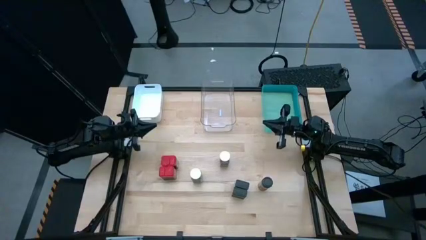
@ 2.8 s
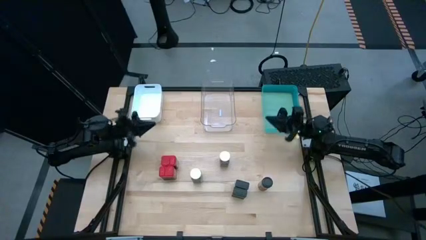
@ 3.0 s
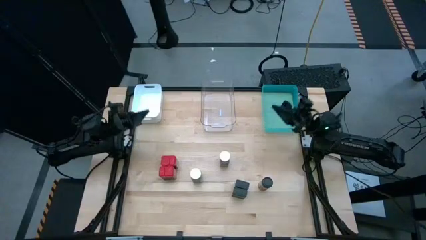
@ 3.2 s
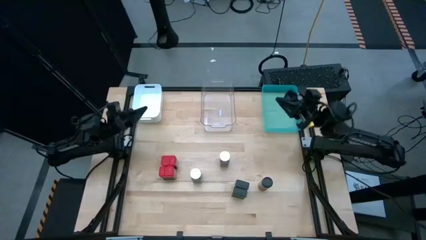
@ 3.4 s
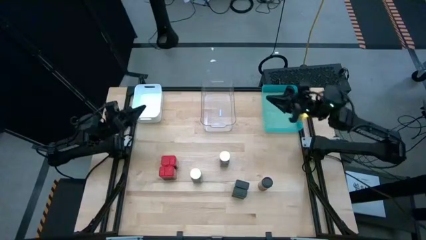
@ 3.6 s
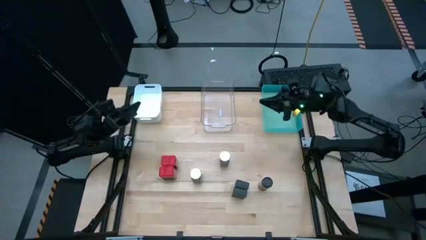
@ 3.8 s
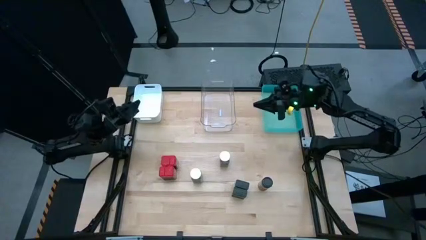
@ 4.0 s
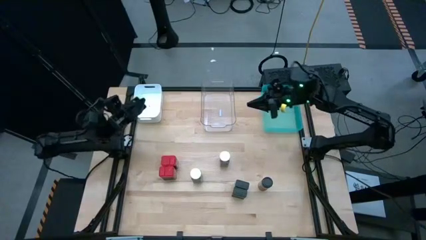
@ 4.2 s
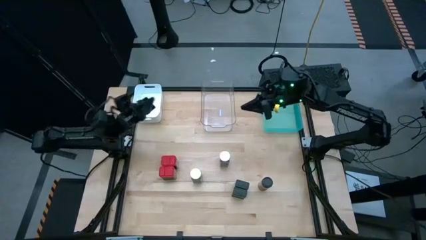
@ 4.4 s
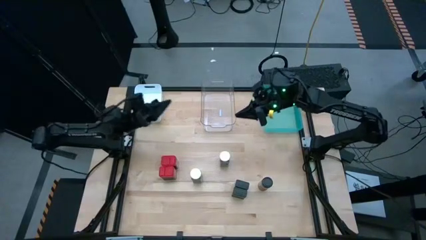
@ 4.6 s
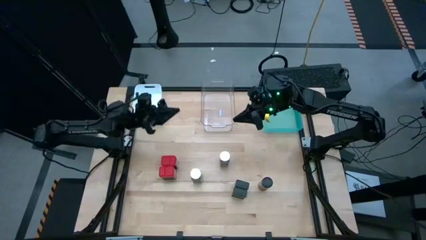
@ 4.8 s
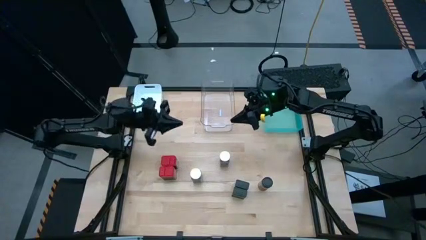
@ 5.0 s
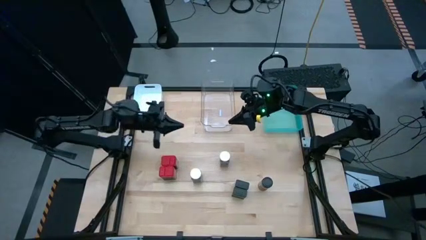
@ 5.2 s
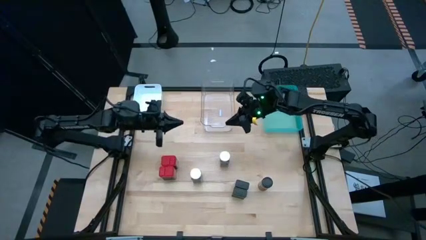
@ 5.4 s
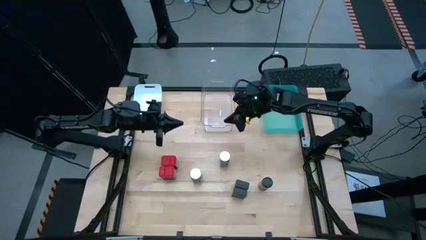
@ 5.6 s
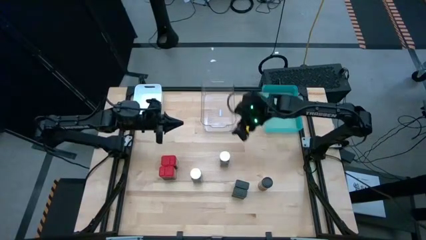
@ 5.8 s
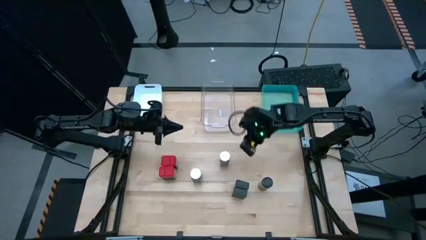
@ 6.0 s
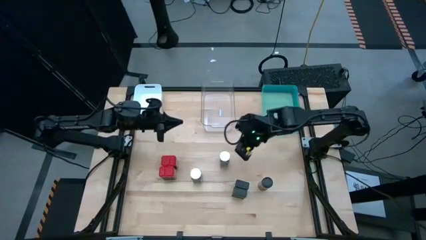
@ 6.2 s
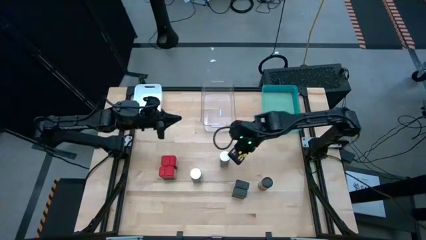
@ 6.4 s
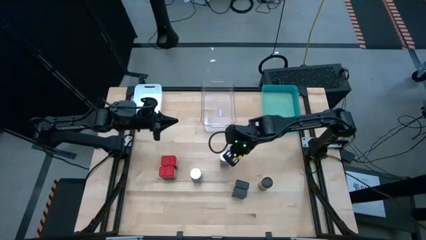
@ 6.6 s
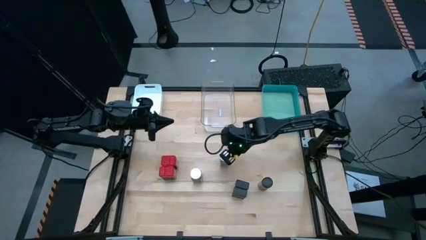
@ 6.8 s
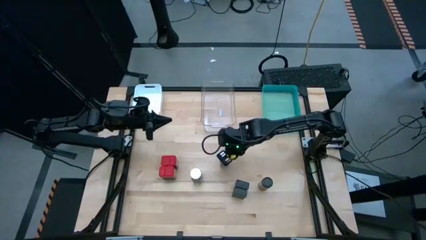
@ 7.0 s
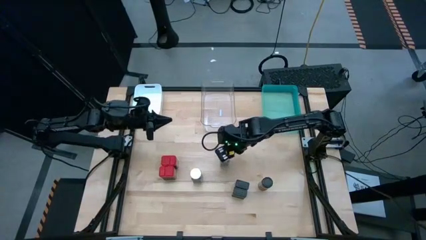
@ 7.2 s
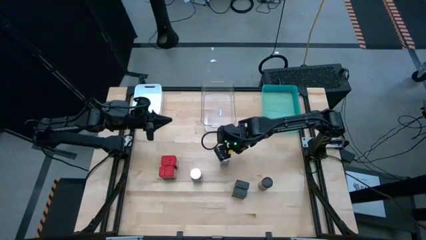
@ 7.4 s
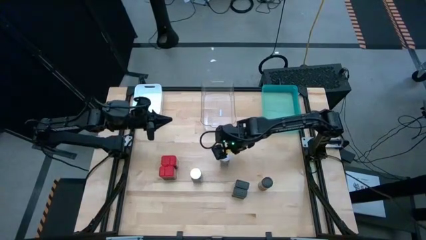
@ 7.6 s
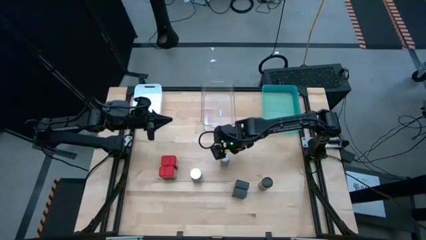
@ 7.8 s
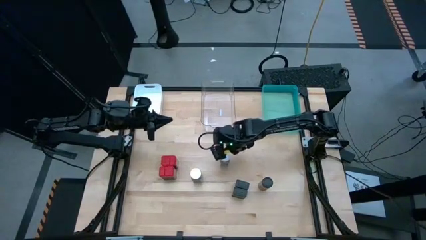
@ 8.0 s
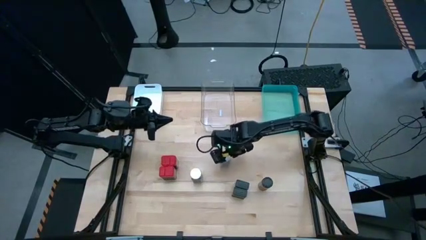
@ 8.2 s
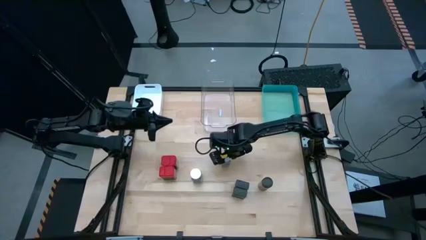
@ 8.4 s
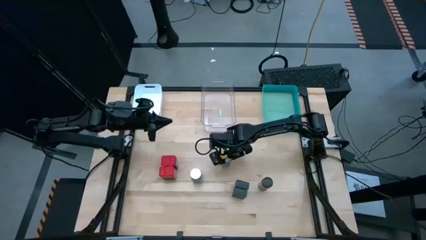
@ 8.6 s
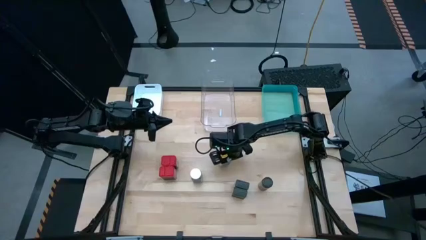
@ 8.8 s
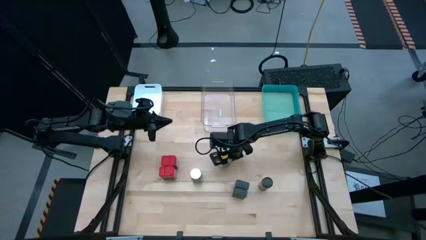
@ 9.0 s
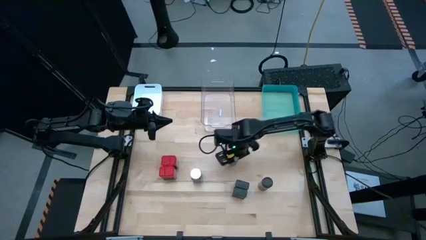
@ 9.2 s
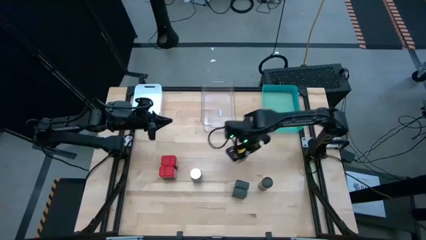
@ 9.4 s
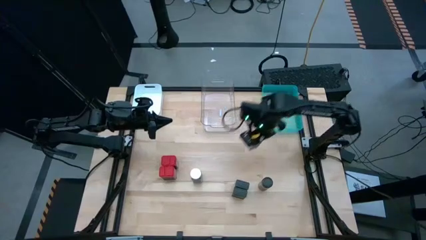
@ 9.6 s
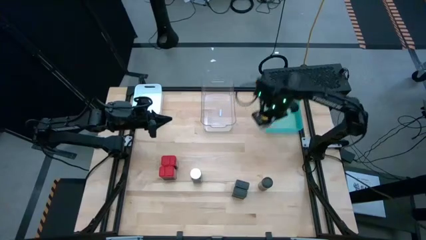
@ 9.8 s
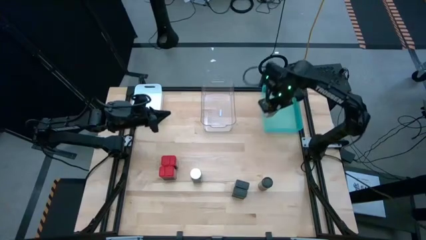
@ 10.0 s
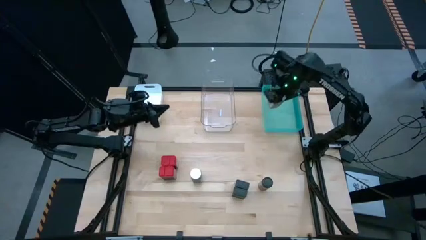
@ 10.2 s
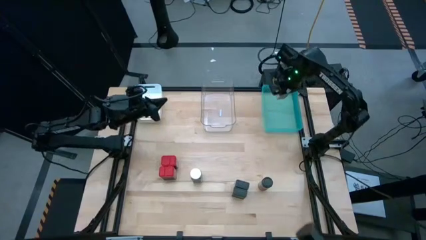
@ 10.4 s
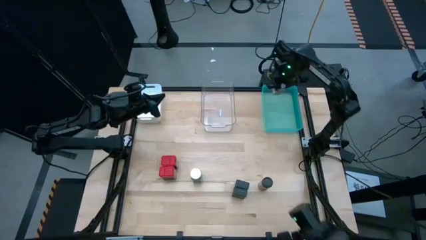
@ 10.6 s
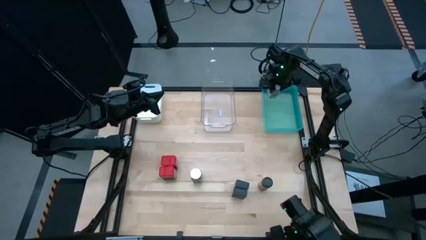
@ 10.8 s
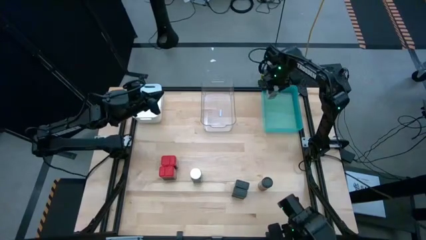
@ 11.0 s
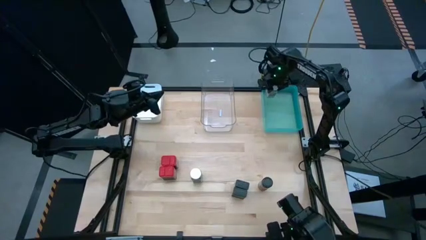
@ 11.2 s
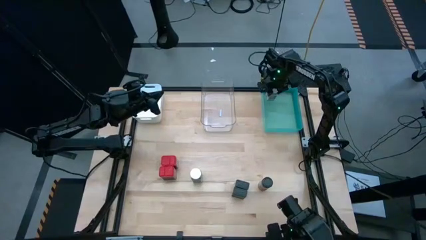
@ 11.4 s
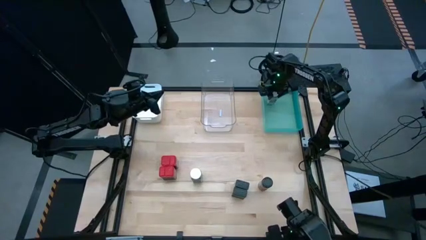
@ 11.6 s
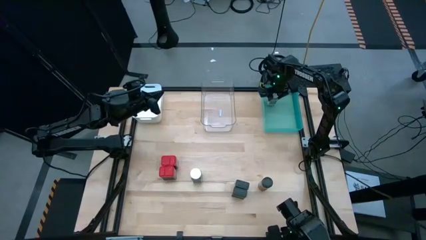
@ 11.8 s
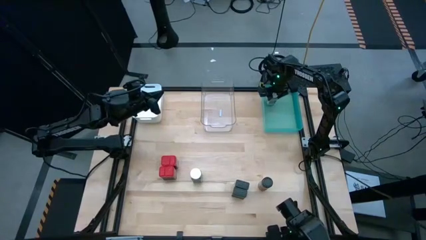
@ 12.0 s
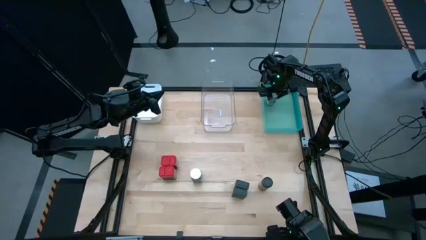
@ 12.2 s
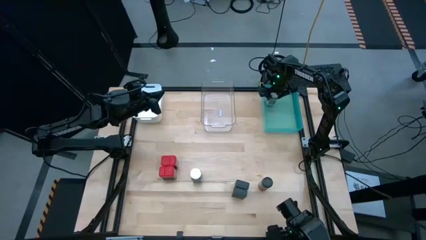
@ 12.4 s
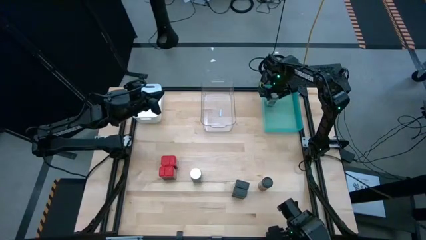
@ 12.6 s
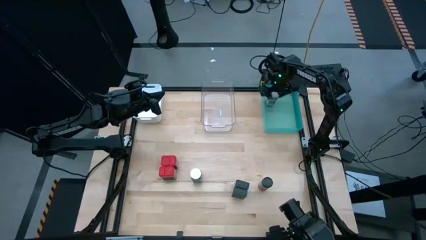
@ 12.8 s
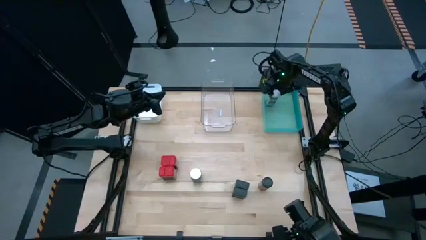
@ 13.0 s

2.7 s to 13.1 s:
Task: Sort spices by type
Put the right white seasoning bottle into the green bin
